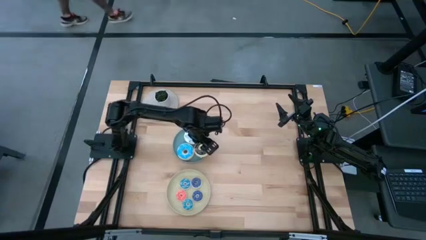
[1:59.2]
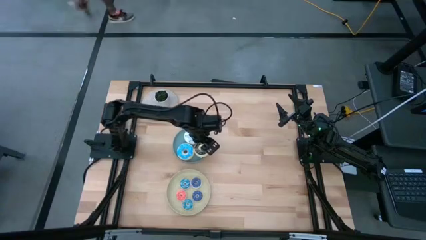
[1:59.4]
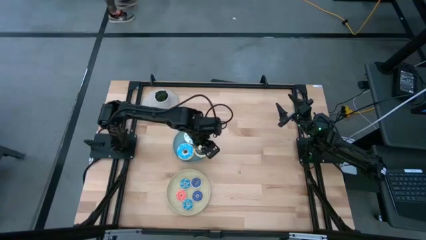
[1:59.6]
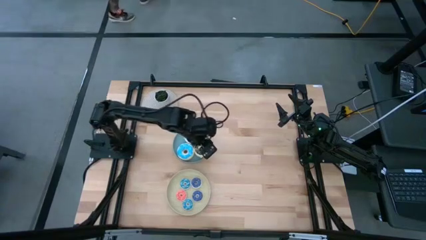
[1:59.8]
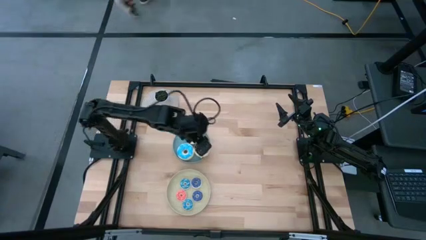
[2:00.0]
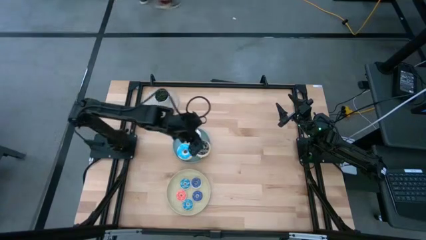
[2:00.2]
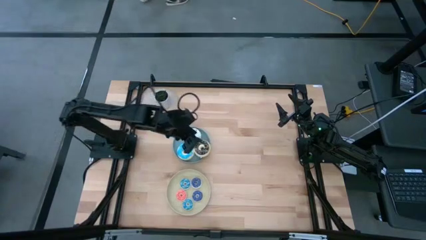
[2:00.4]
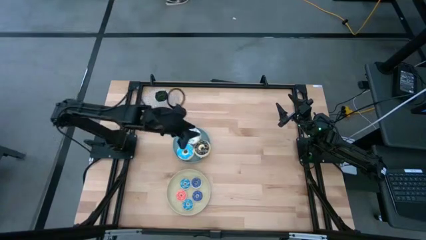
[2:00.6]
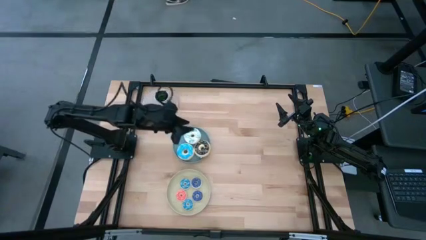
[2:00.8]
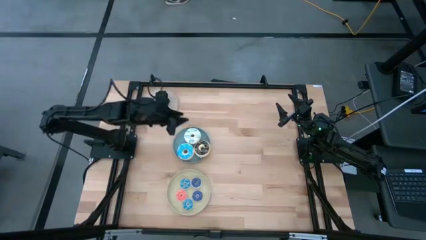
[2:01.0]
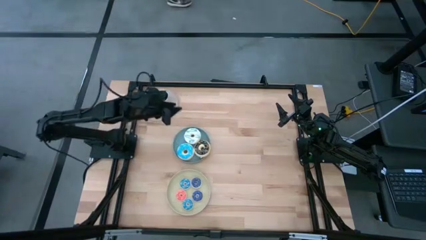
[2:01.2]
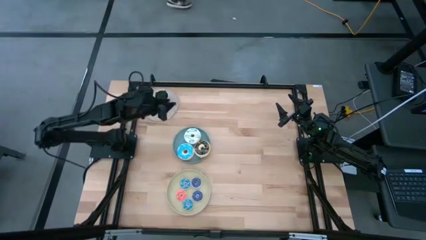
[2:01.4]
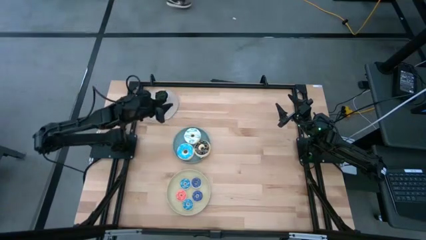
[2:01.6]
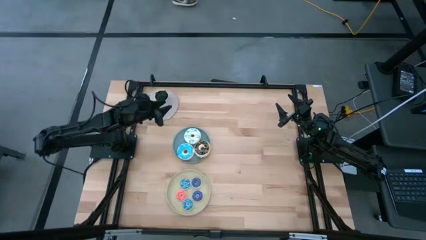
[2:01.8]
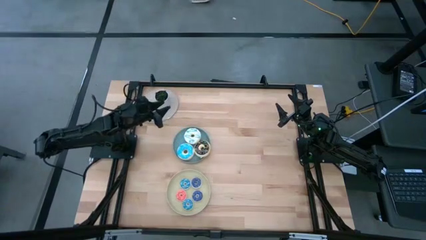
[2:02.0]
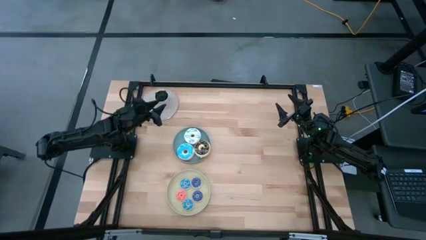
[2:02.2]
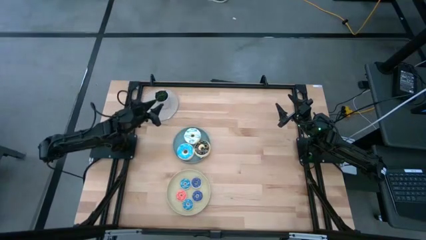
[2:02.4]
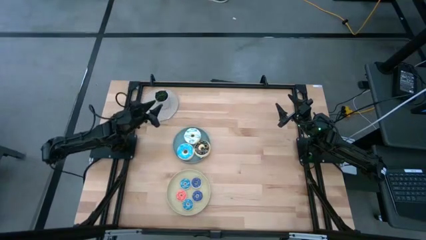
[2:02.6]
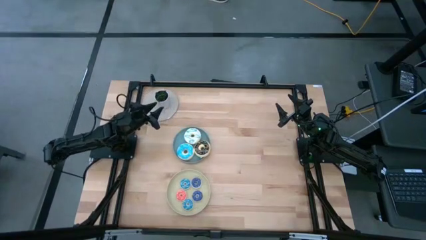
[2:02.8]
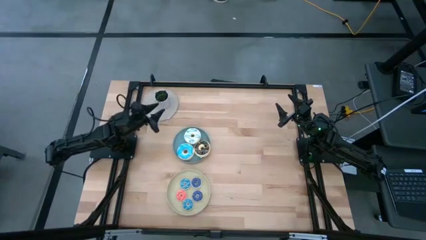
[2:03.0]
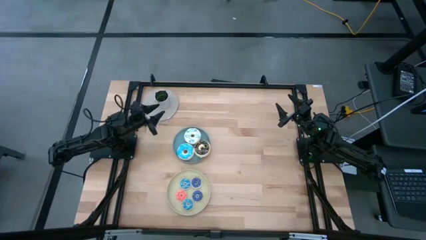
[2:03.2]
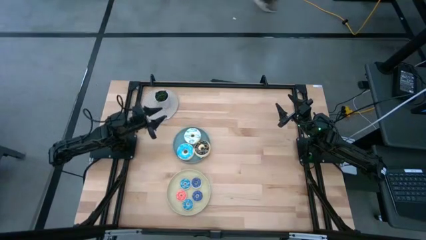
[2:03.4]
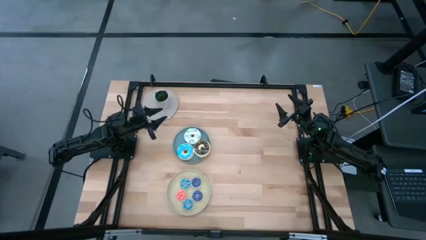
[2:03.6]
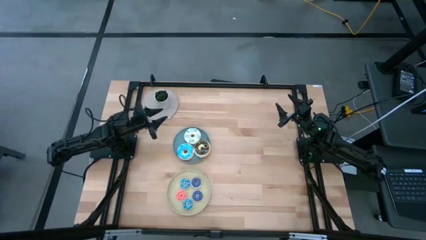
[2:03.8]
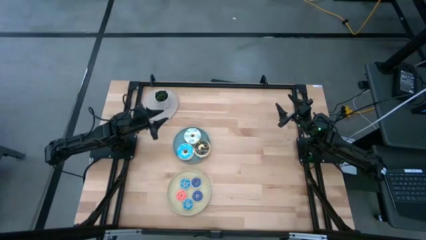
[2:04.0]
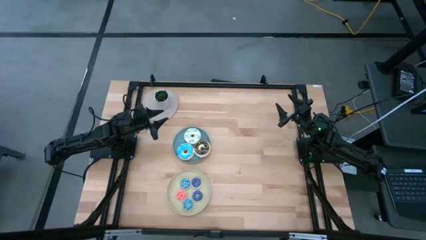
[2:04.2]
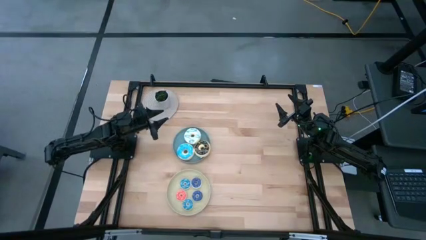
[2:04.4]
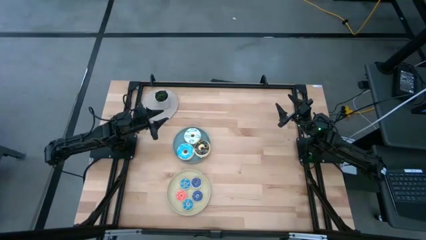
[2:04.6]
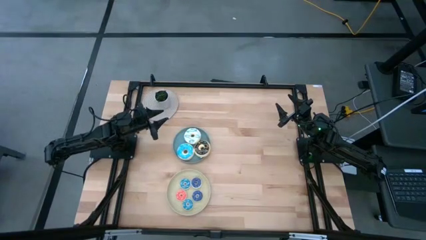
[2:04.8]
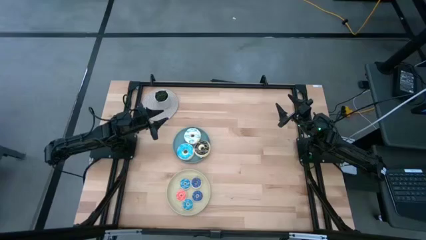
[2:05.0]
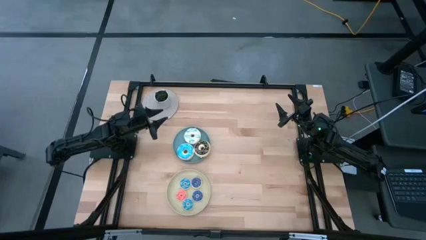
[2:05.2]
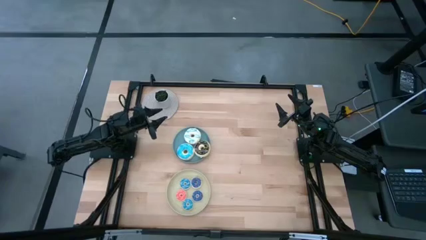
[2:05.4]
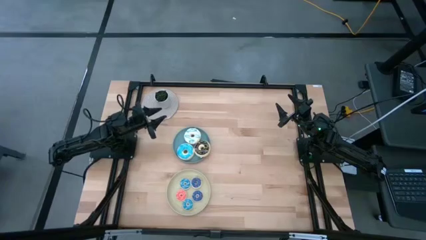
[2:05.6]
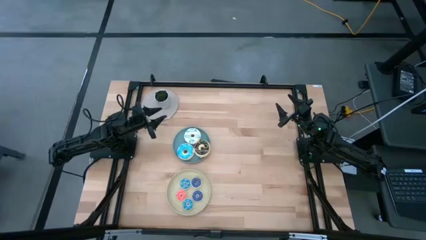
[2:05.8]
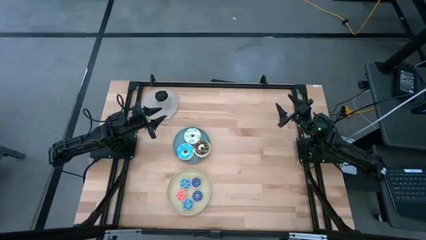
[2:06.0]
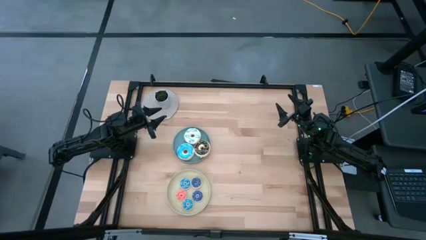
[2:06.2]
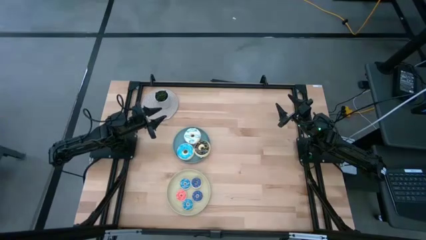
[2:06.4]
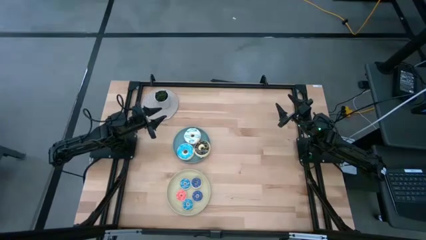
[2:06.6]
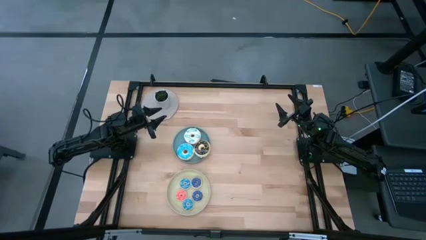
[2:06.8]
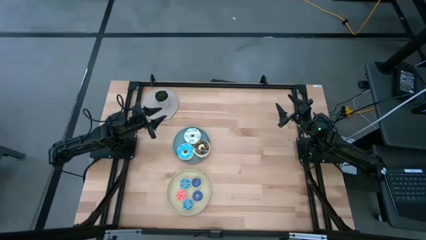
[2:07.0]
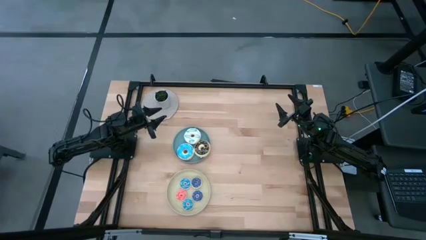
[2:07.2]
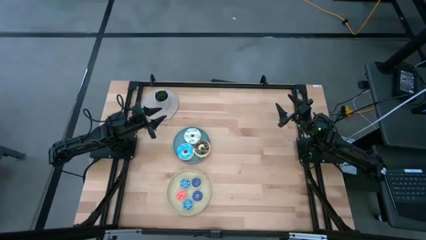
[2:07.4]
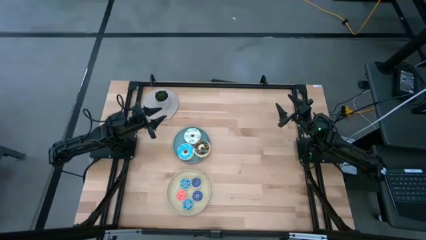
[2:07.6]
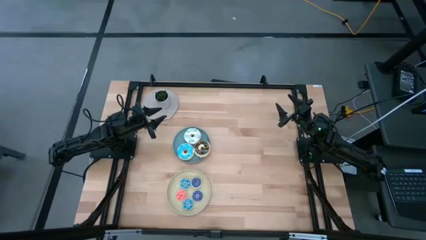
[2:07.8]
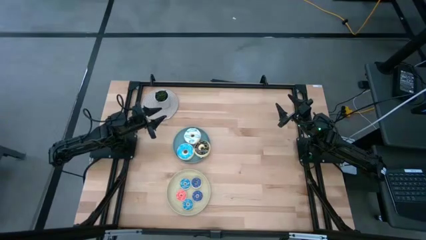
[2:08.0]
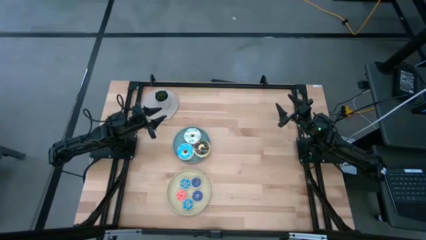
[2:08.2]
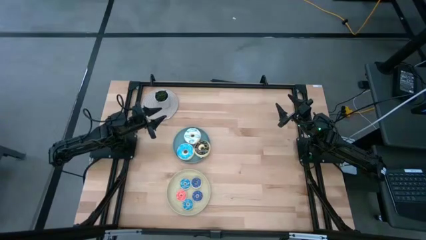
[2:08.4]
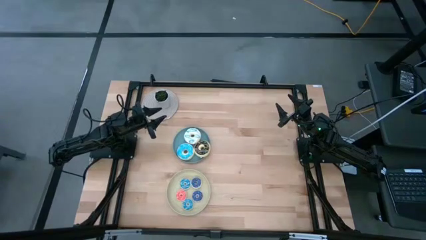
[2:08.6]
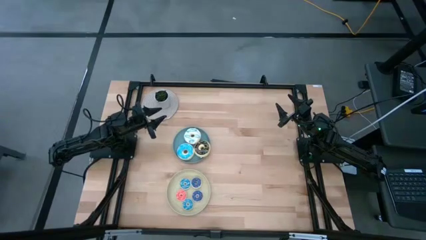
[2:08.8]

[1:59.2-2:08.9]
Task: Pick & Place donuts
Return to Home Position

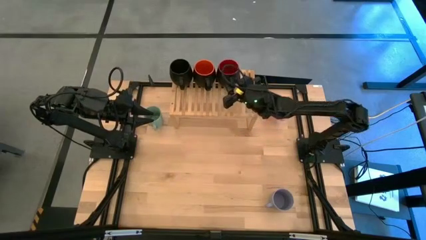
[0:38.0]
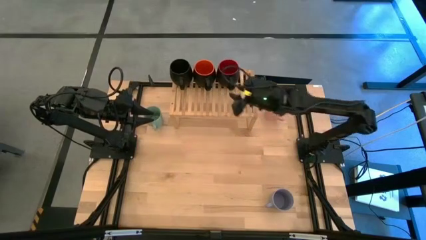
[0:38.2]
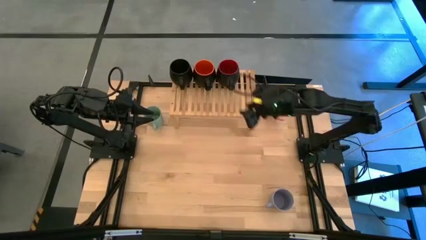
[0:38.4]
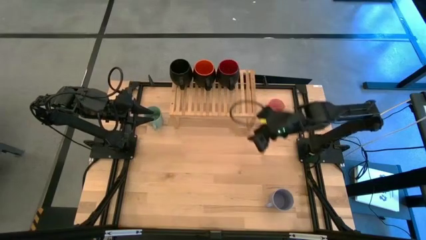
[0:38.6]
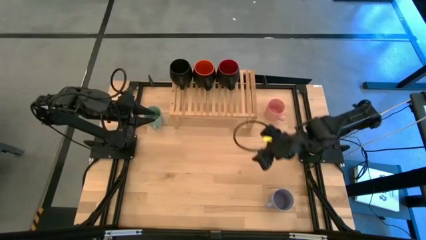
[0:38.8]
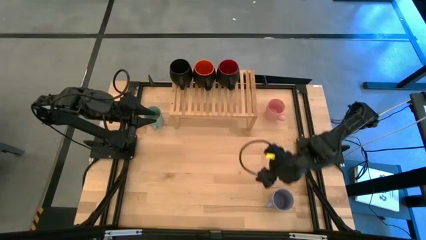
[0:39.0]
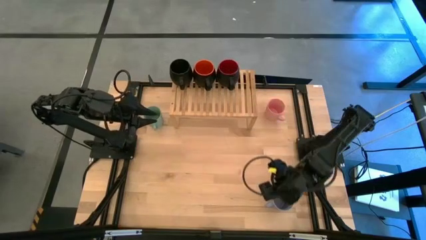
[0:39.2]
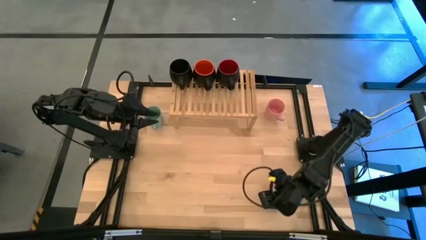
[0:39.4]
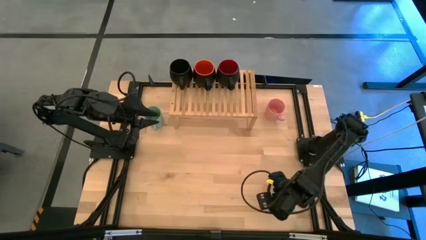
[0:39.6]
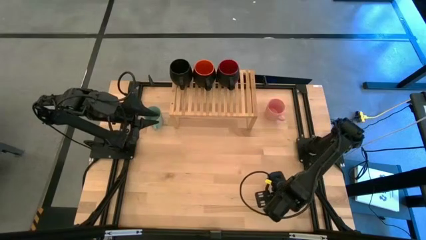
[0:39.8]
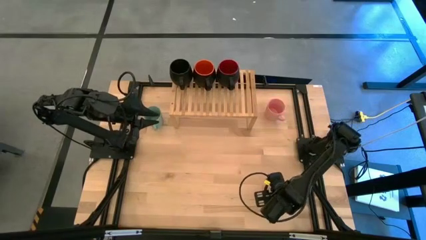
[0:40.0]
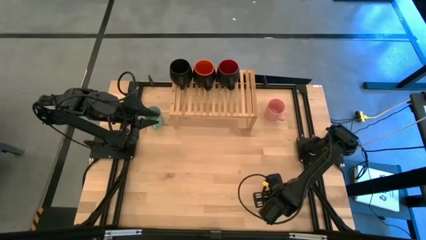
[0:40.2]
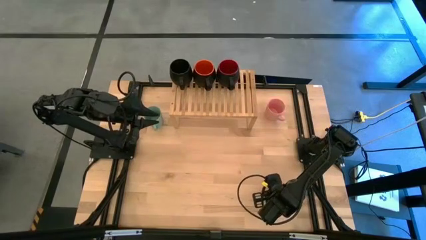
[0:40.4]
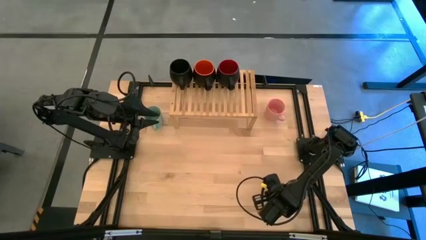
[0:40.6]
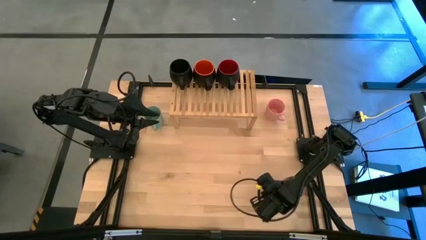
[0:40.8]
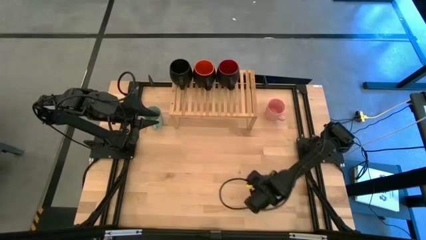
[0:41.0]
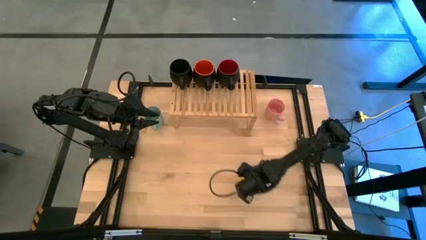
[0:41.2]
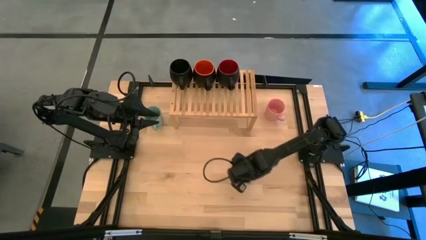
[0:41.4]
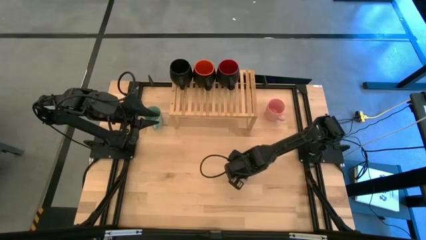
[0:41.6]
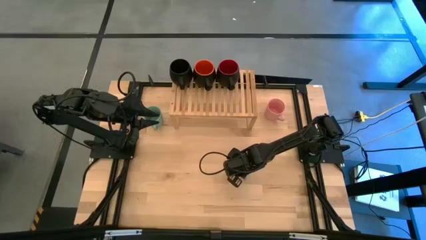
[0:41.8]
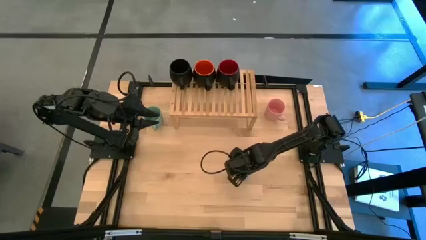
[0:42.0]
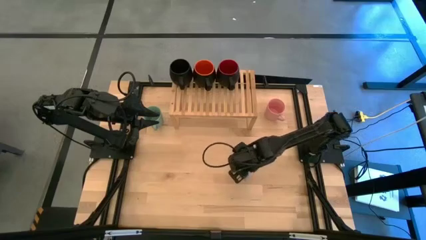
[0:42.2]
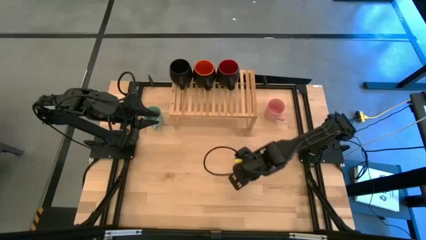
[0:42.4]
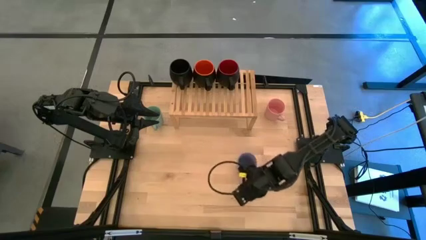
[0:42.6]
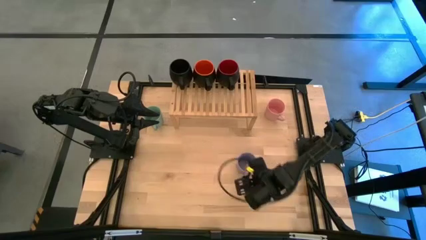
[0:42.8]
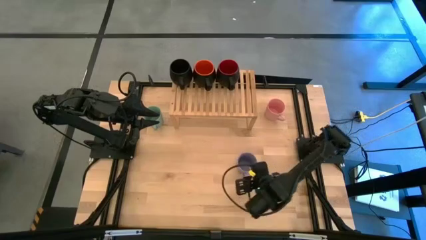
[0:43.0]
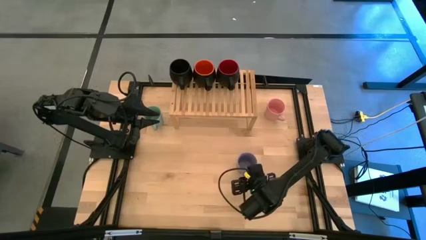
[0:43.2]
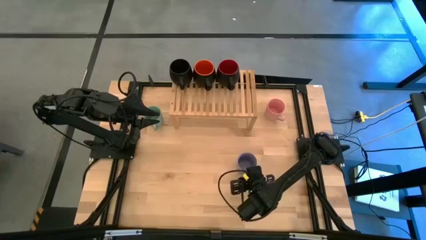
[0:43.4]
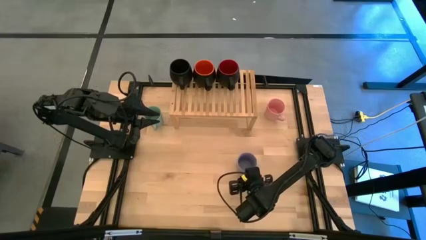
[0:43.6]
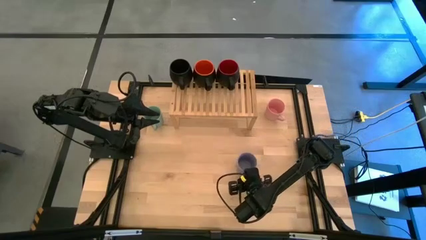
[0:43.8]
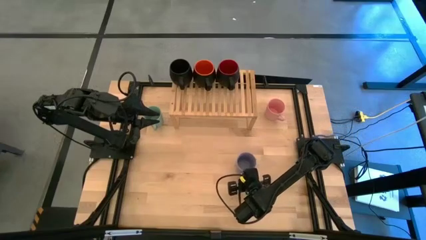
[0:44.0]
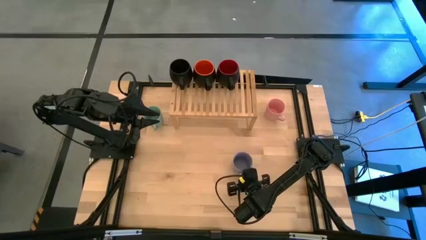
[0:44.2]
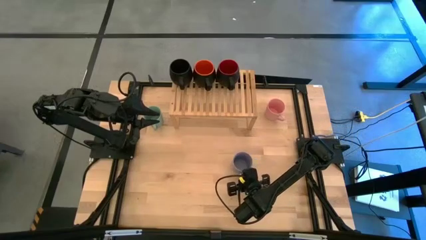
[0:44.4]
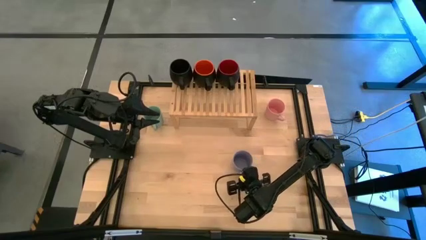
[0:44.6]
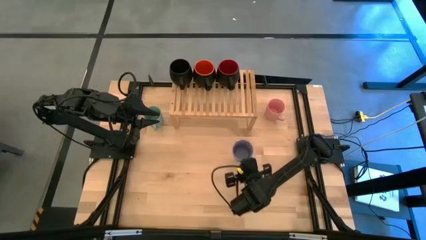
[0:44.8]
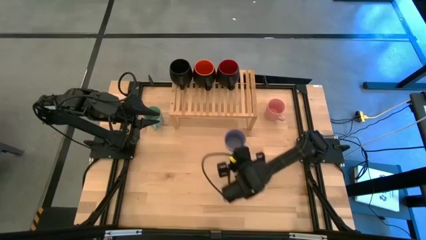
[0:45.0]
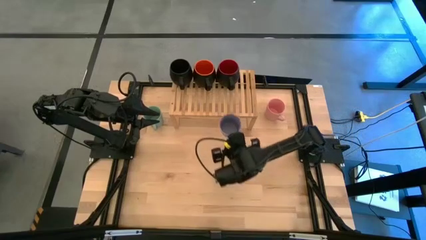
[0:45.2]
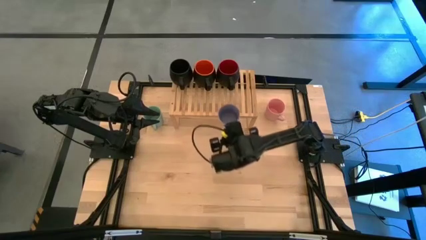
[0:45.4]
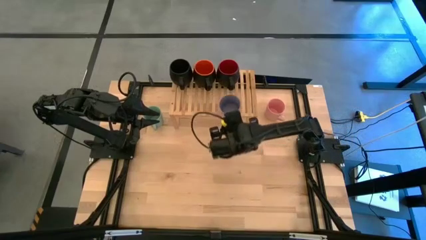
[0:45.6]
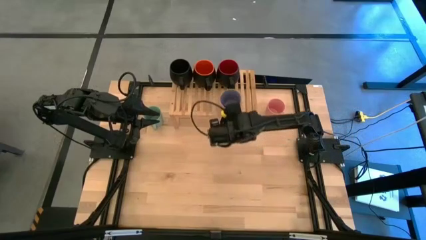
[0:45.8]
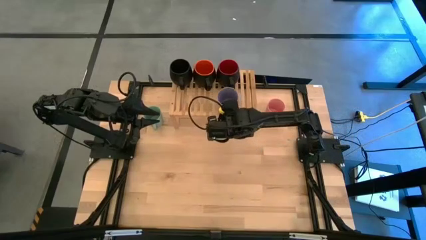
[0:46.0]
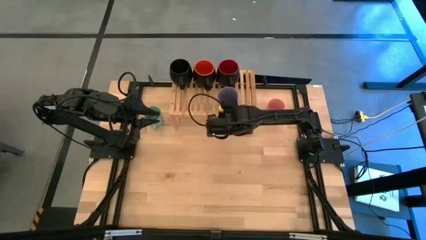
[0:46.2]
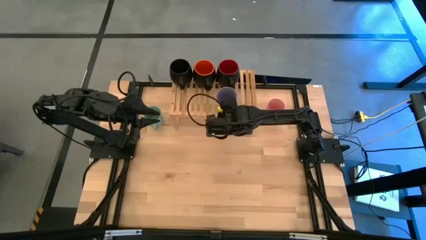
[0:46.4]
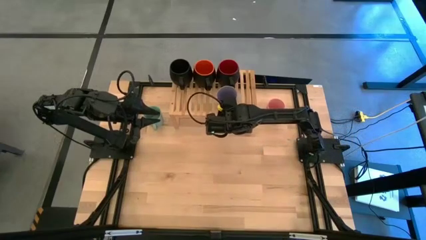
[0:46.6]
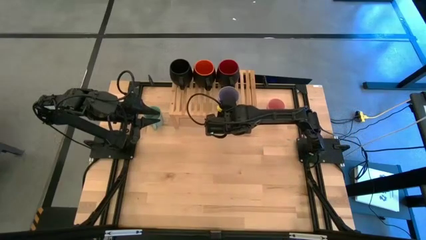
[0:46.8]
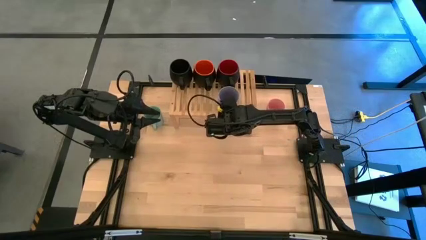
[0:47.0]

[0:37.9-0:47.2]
Task: Place coffee mugs
Put the purple mug on the shelf
